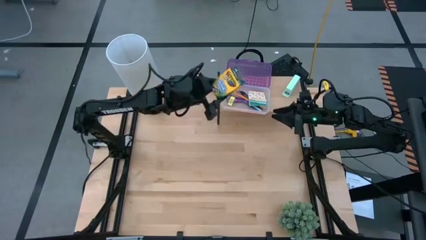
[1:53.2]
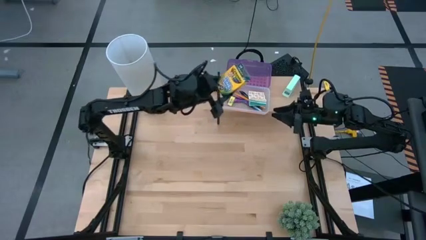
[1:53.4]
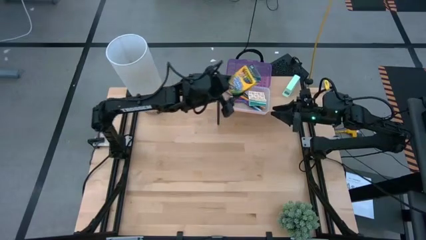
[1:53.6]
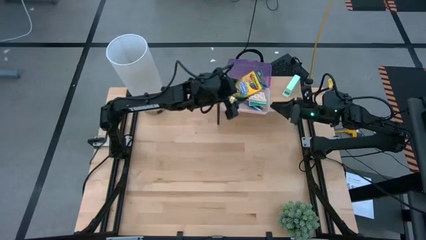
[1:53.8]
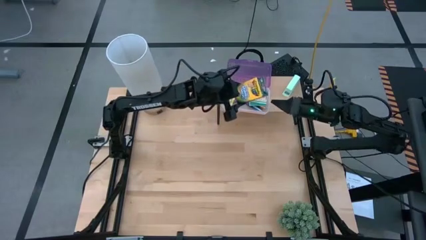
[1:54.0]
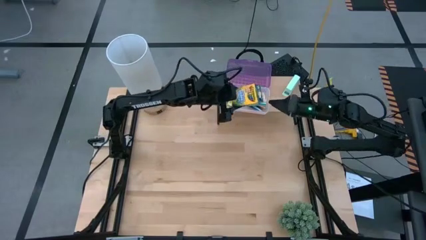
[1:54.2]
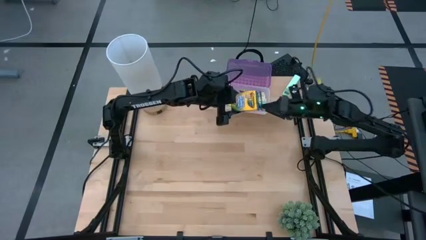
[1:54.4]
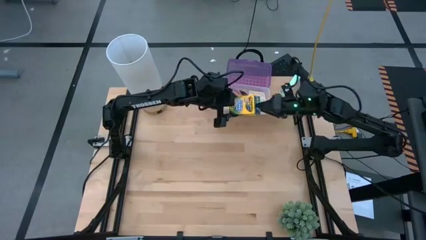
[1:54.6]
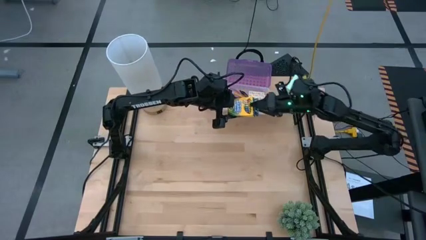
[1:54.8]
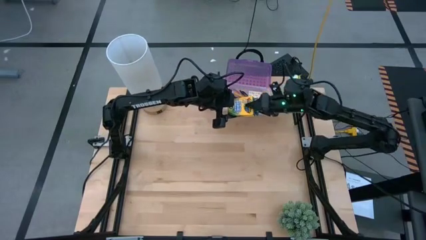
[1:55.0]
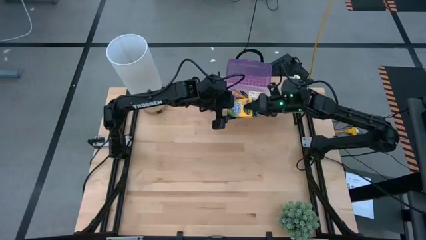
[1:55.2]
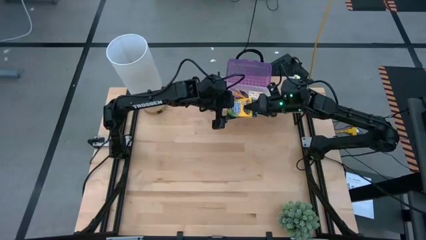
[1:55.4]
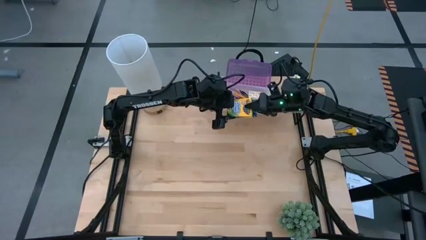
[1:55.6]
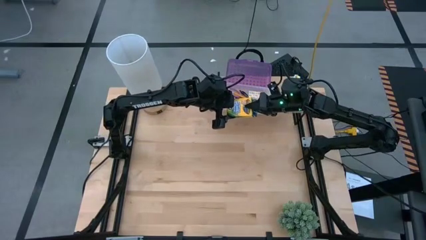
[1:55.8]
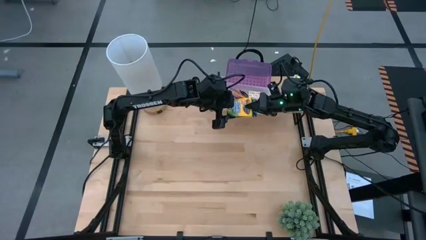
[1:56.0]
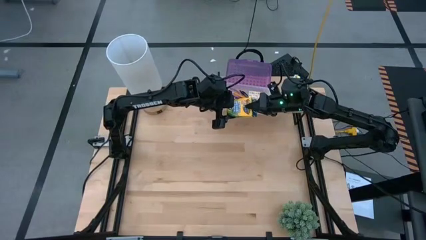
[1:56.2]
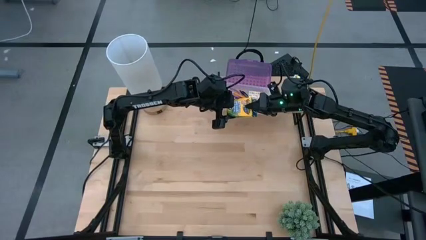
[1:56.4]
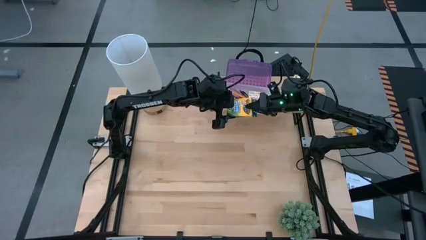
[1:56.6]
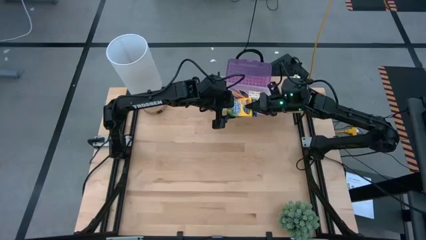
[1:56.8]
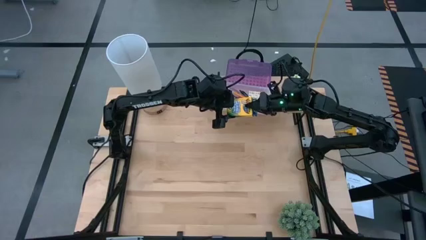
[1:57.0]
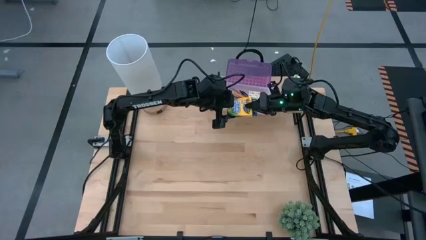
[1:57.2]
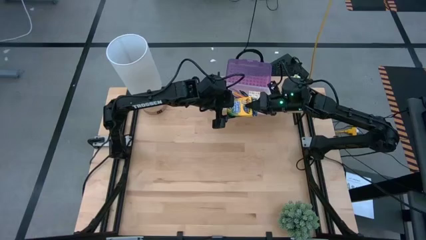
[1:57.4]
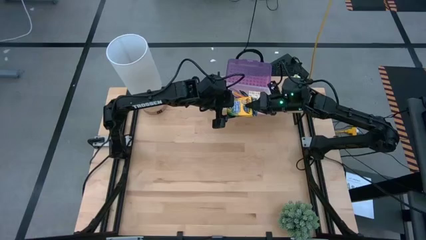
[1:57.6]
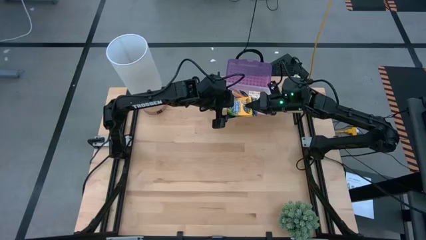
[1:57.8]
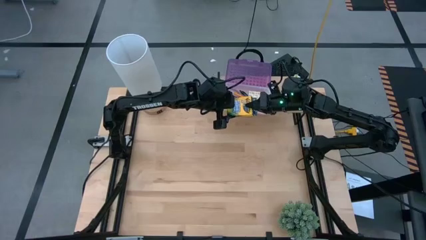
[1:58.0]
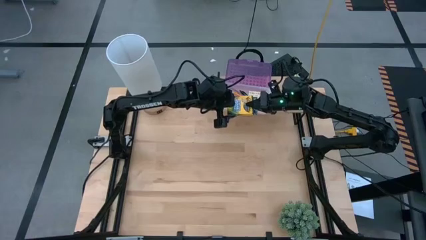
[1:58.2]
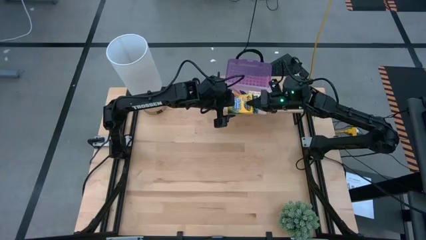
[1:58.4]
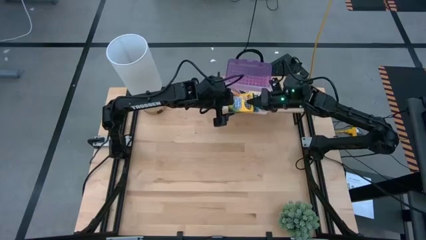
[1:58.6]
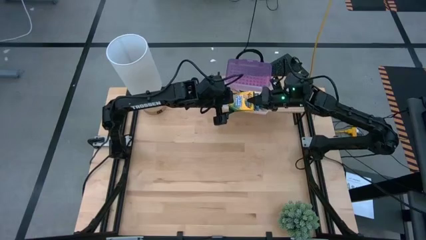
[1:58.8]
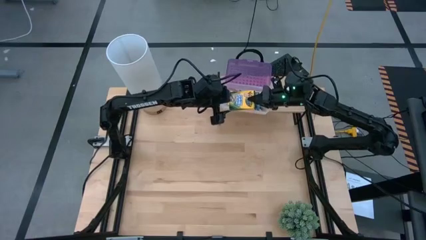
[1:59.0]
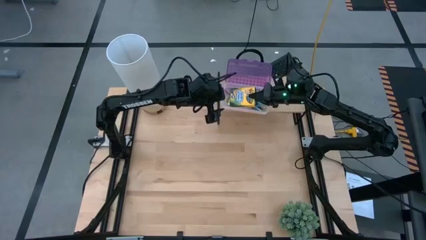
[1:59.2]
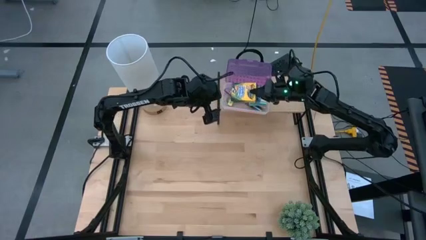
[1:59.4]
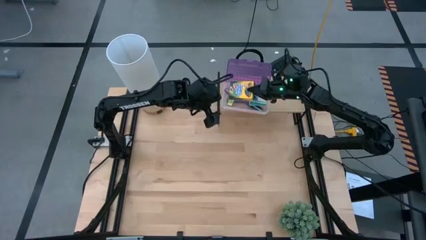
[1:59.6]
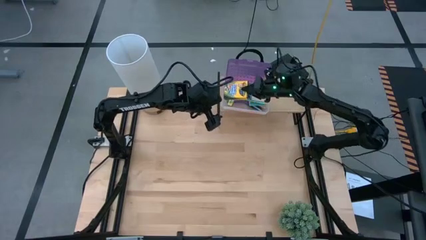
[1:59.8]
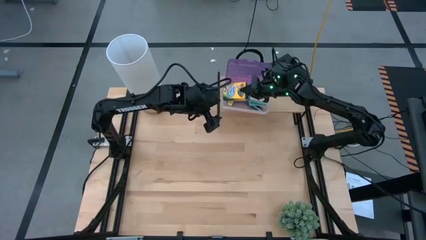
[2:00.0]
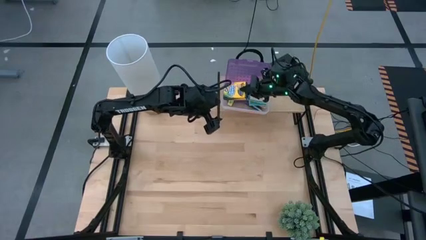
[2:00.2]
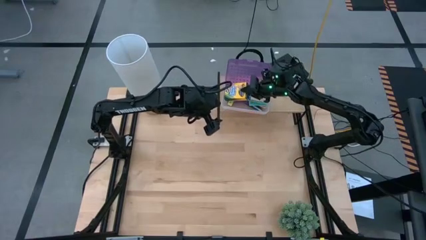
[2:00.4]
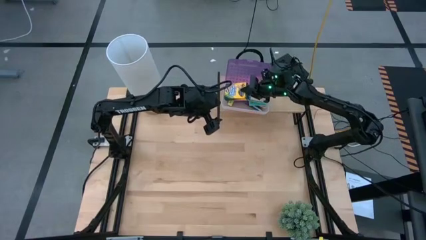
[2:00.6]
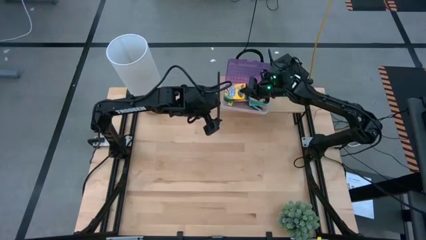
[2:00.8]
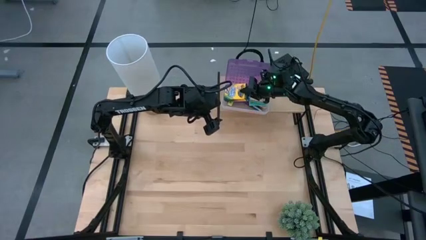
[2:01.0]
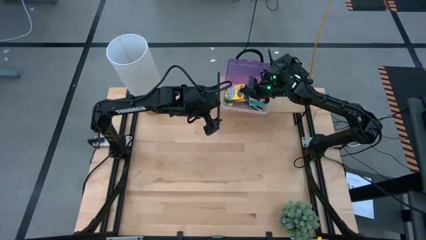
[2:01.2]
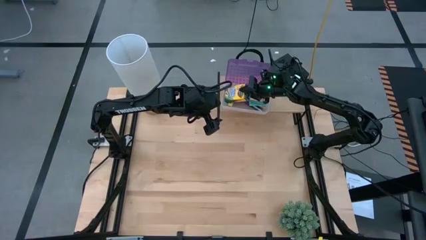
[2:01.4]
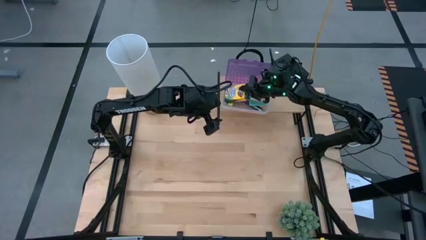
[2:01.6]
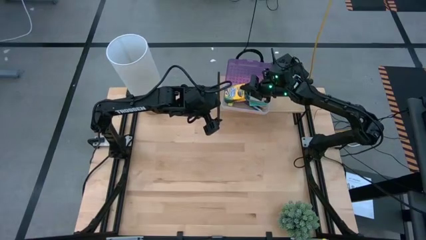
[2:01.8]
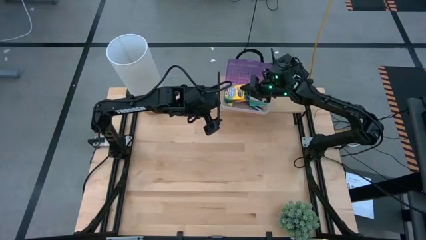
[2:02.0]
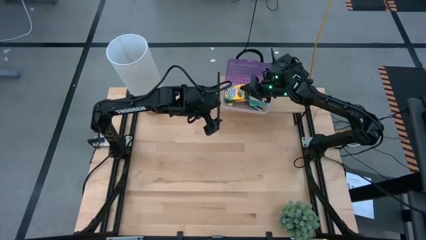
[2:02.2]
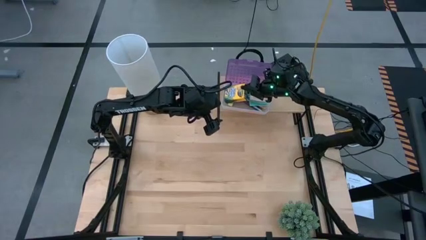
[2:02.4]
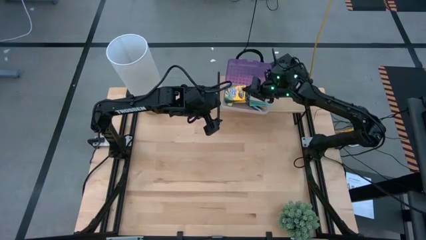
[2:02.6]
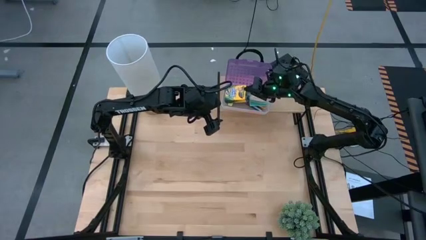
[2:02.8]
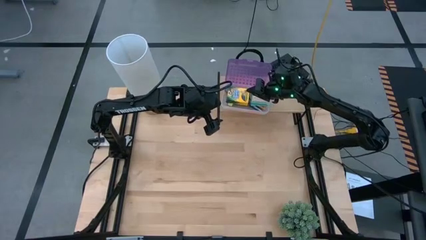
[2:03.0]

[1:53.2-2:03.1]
Task: Pick & place school supplies into a supply box
Put the yellow pack of crayons into the purple supply box

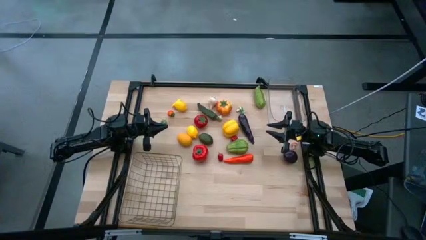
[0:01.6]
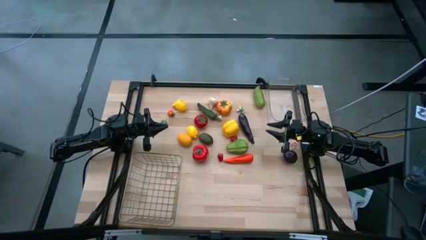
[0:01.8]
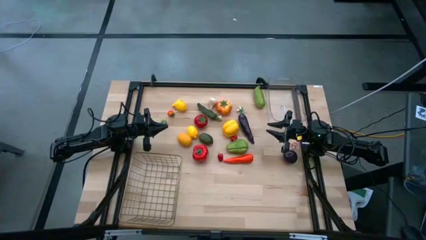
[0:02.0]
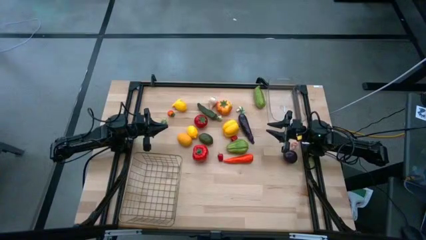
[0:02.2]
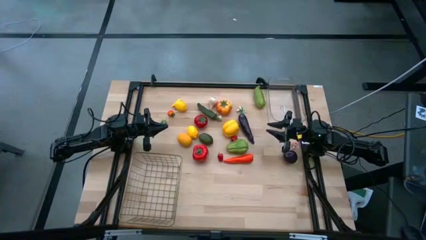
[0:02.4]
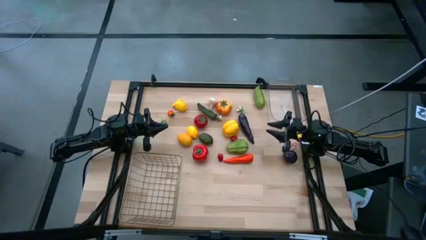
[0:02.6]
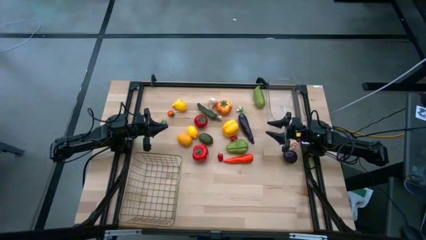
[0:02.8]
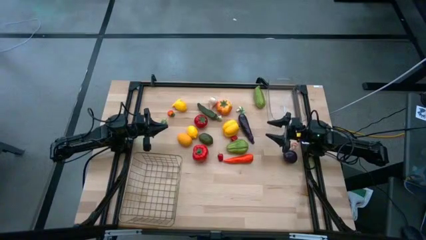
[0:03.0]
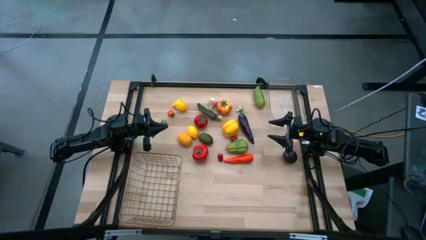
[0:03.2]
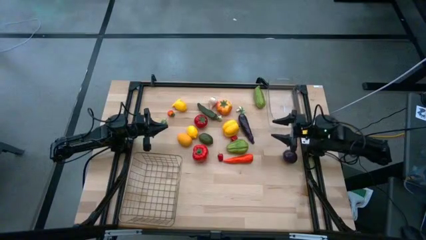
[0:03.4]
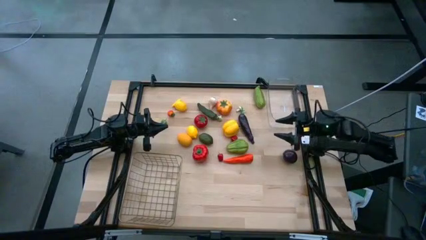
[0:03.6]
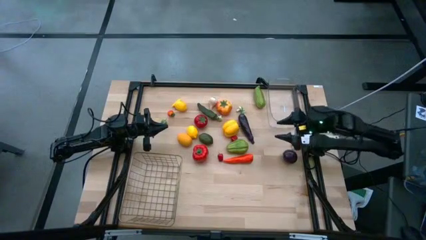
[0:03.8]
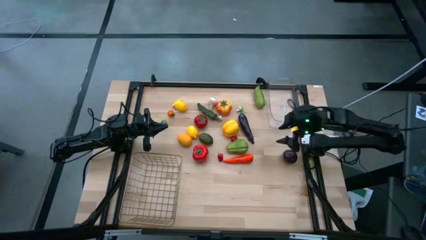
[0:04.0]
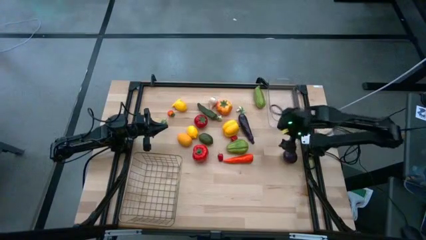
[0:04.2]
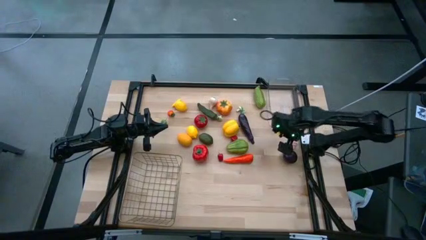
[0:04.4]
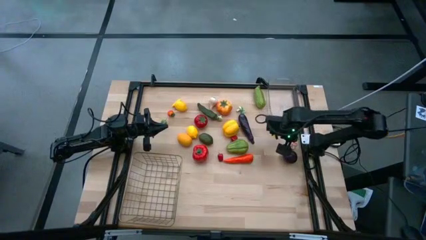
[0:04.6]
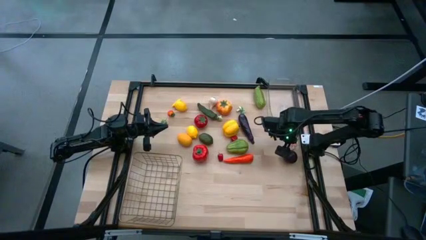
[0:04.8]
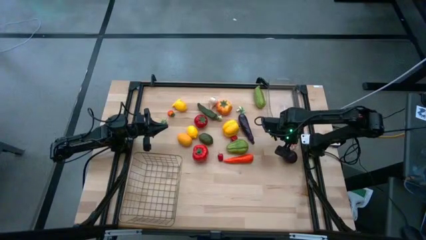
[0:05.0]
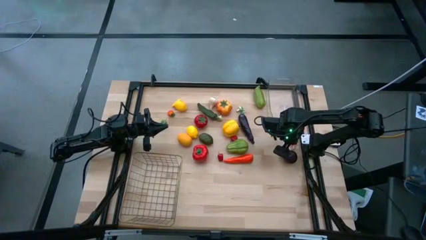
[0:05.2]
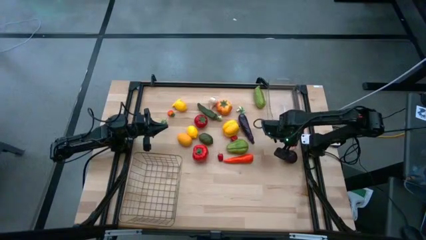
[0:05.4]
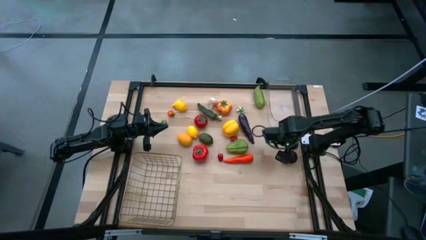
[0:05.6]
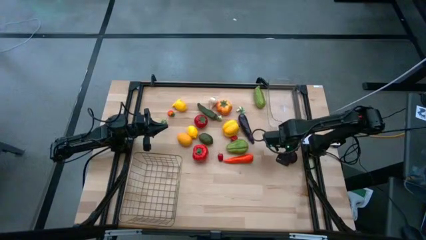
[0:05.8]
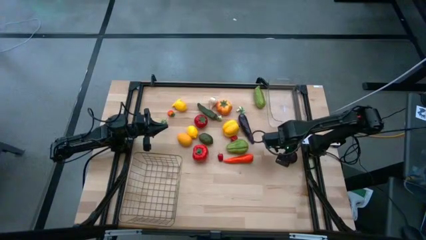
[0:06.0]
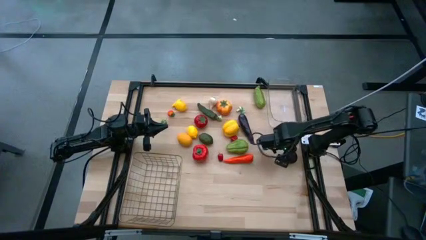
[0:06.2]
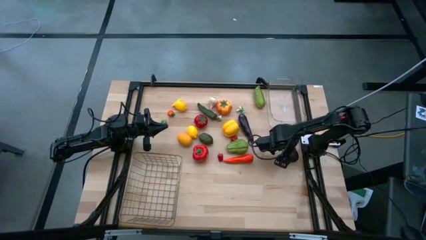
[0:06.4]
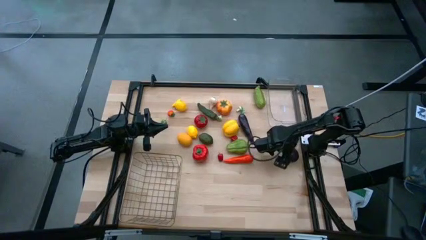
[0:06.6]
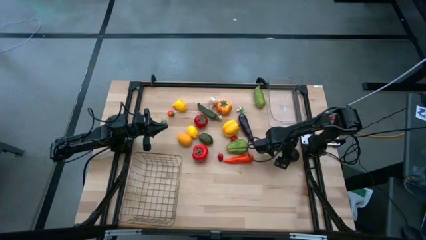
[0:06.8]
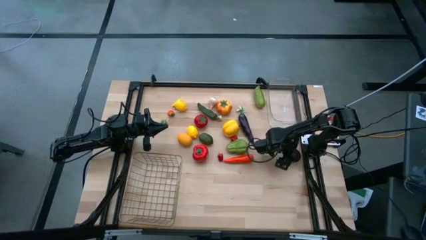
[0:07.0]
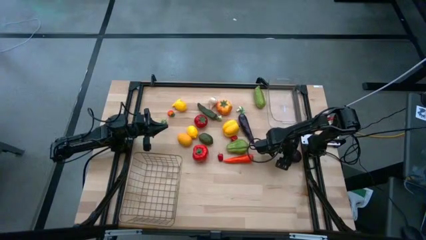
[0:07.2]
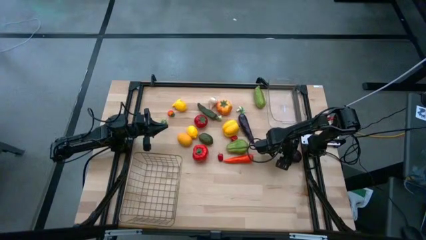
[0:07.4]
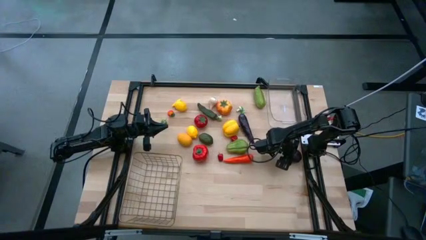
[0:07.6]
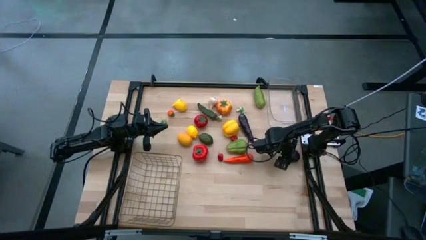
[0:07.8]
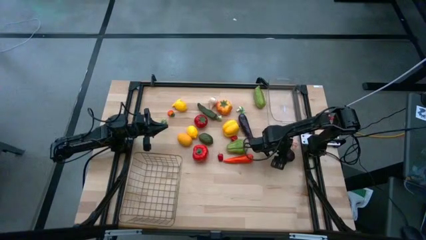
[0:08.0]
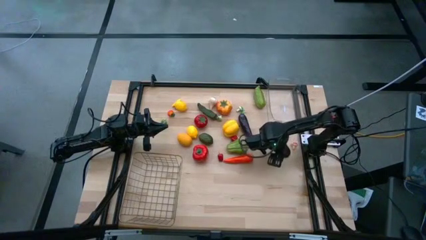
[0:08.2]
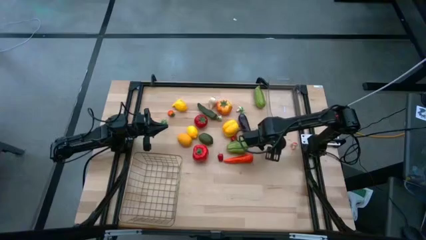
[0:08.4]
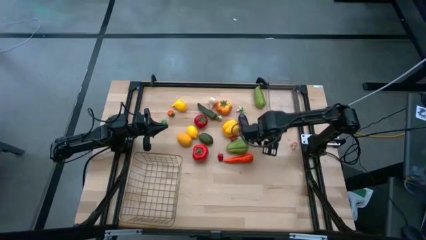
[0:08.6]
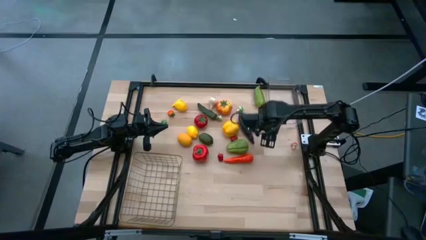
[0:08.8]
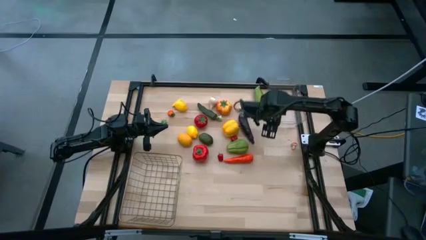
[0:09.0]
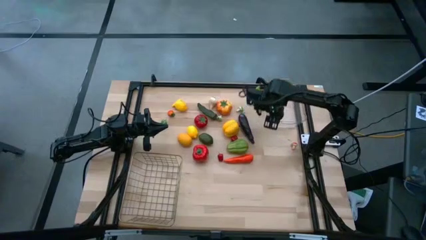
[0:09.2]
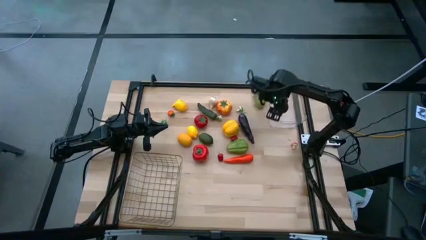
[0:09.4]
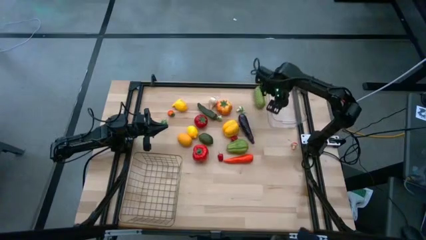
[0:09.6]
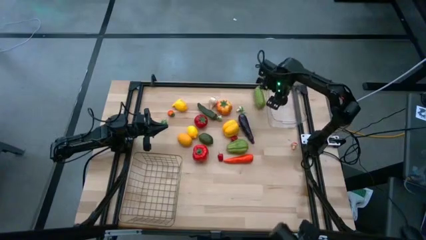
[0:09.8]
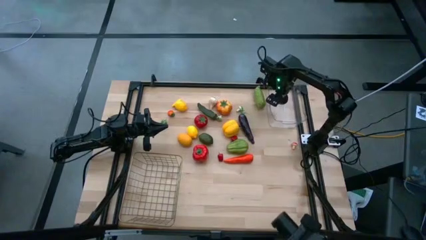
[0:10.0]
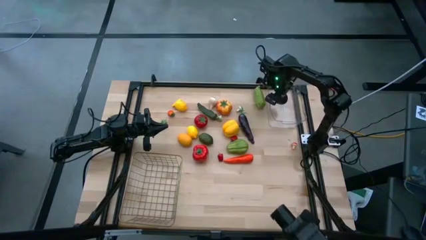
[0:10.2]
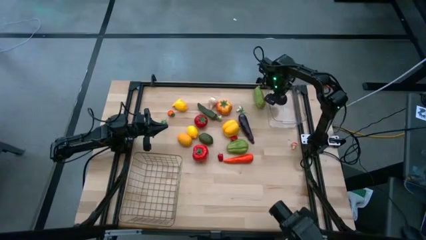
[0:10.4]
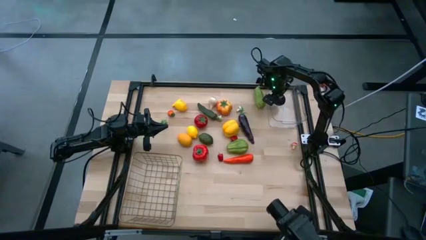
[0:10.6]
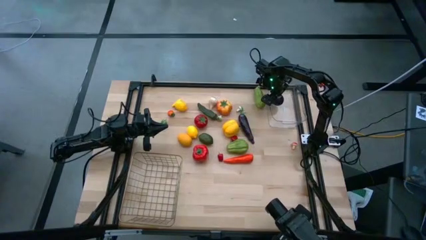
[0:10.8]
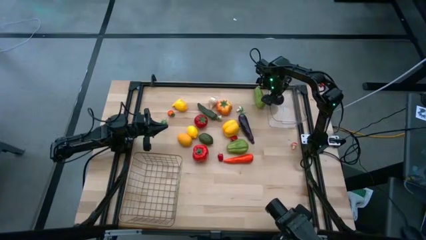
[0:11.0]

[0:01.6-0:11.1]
Task: Sort produce into baskets
Put the purple onion into the transparent bin
